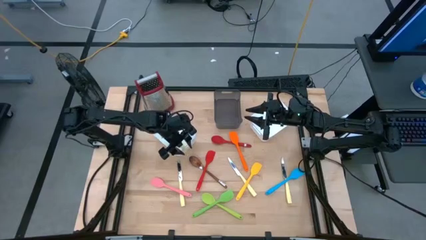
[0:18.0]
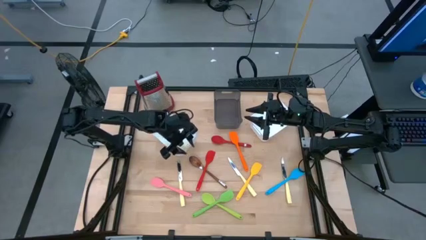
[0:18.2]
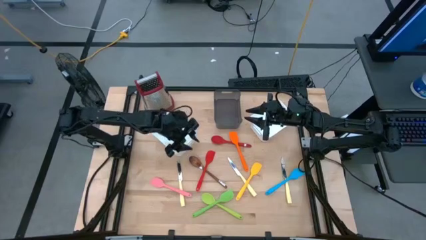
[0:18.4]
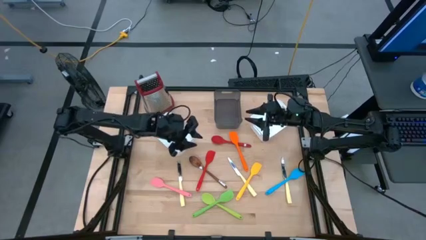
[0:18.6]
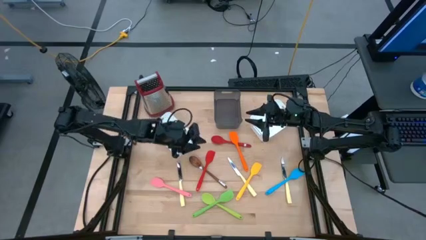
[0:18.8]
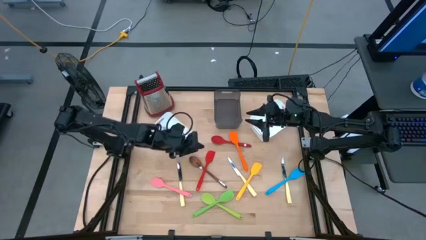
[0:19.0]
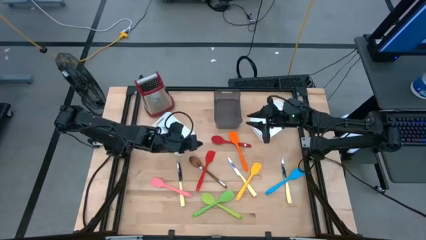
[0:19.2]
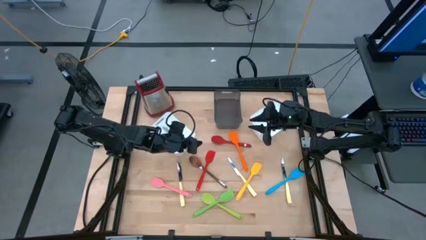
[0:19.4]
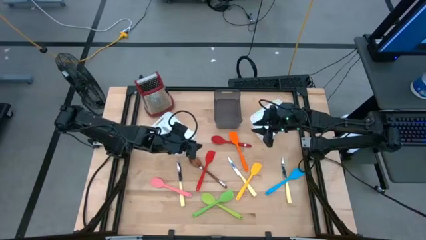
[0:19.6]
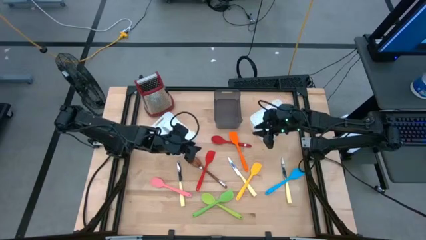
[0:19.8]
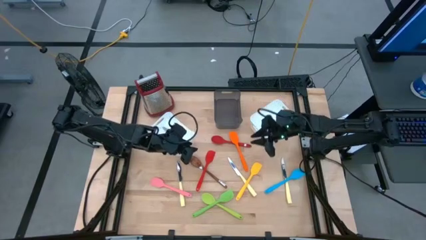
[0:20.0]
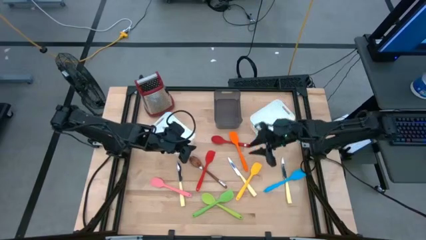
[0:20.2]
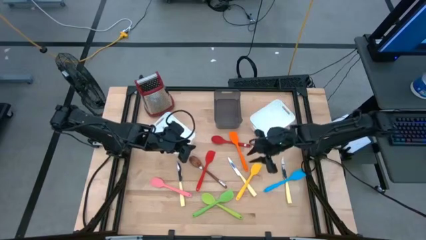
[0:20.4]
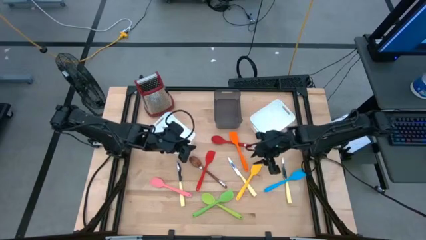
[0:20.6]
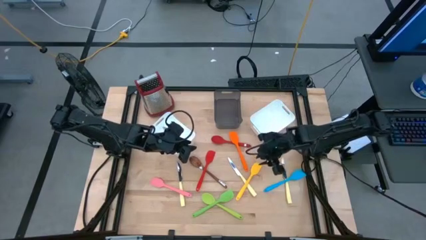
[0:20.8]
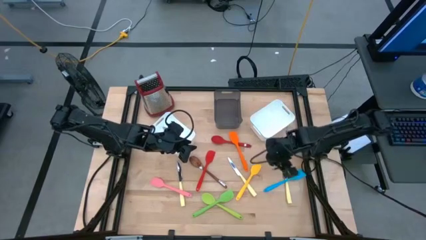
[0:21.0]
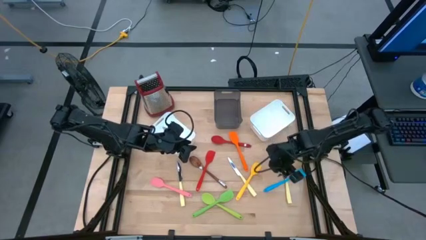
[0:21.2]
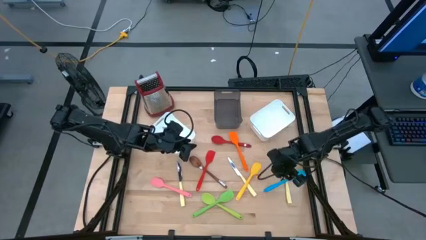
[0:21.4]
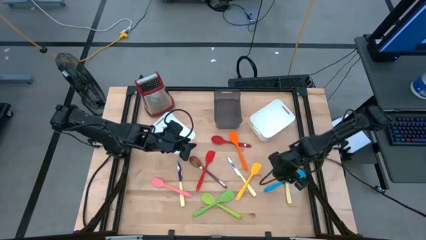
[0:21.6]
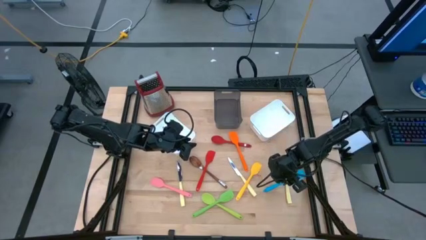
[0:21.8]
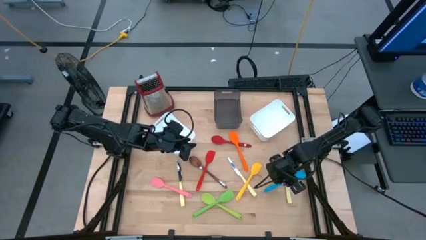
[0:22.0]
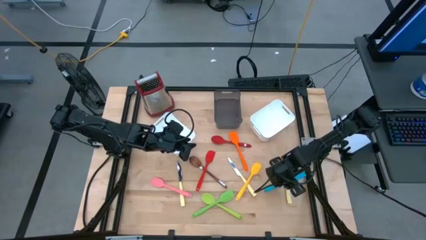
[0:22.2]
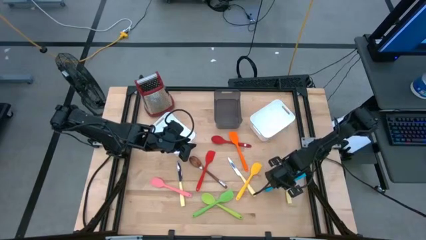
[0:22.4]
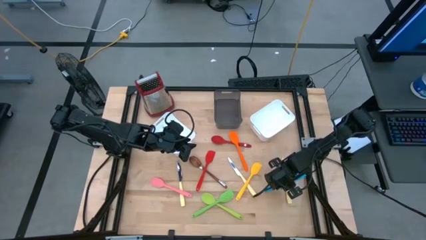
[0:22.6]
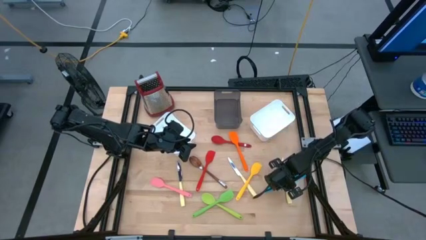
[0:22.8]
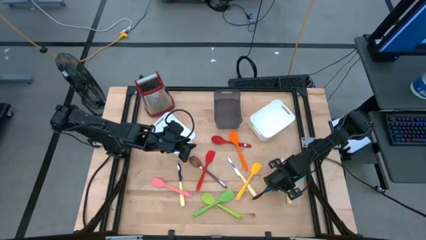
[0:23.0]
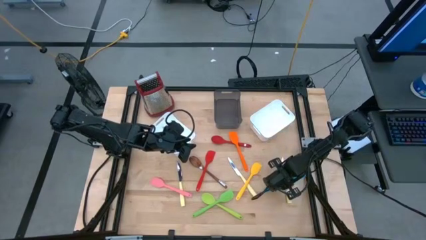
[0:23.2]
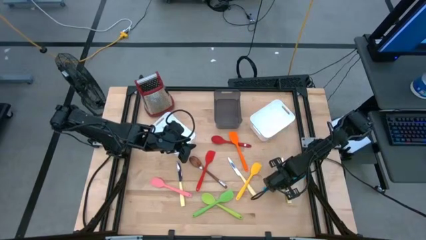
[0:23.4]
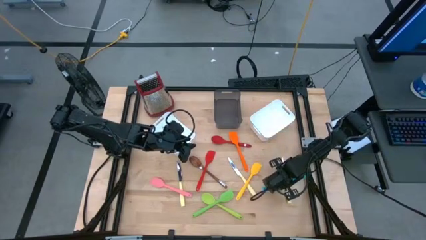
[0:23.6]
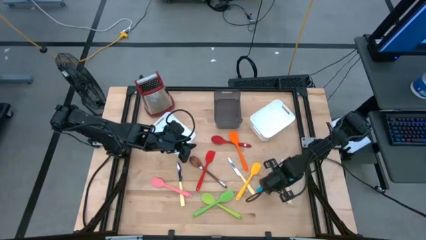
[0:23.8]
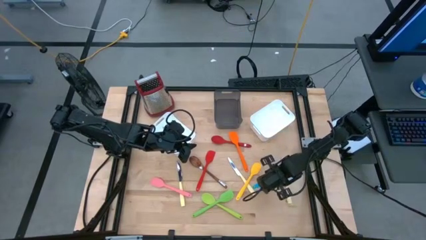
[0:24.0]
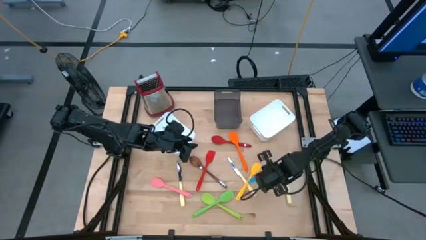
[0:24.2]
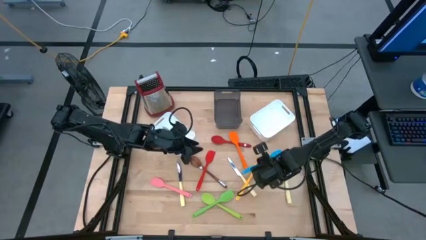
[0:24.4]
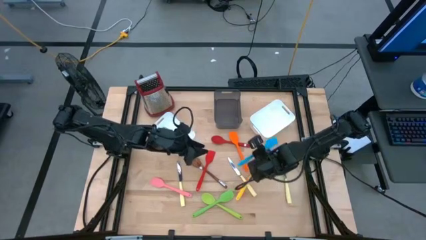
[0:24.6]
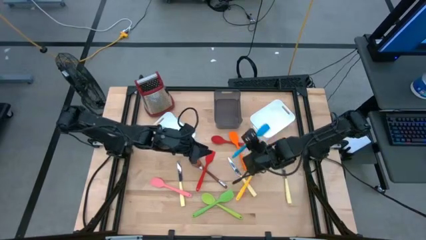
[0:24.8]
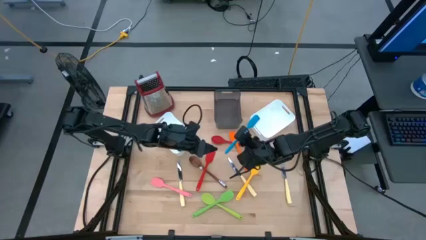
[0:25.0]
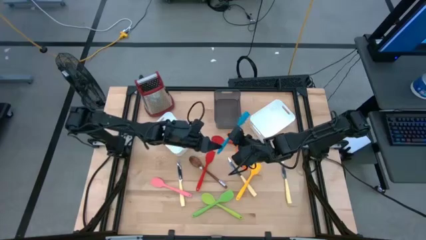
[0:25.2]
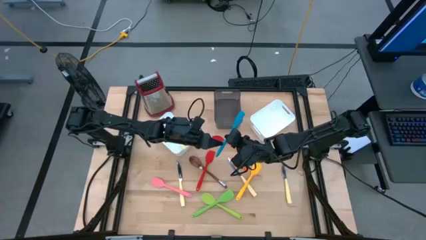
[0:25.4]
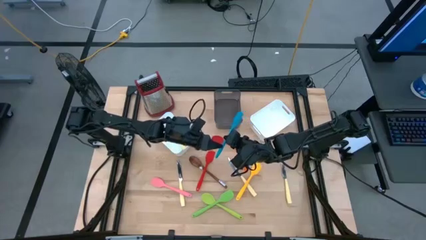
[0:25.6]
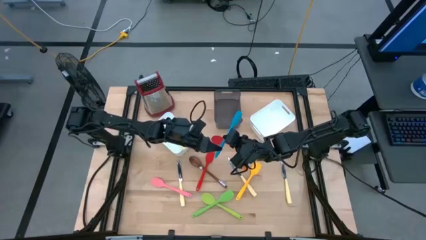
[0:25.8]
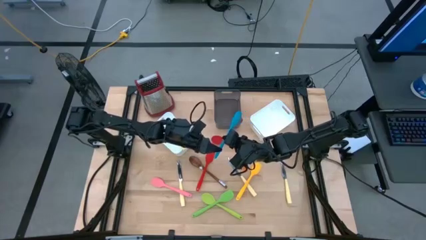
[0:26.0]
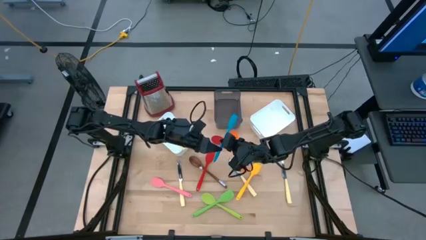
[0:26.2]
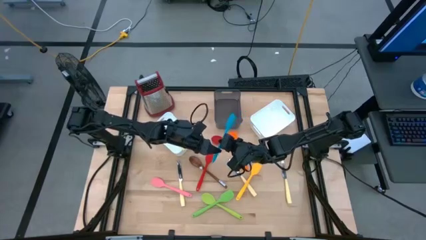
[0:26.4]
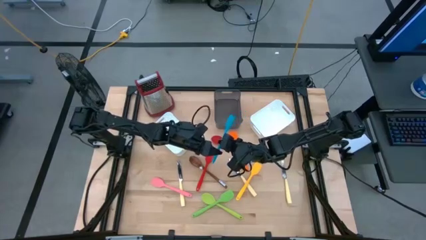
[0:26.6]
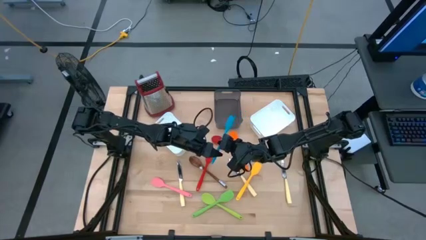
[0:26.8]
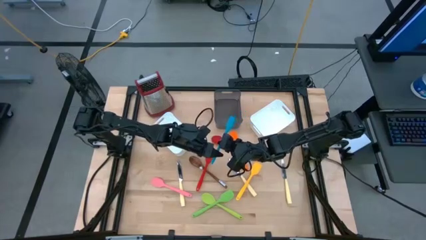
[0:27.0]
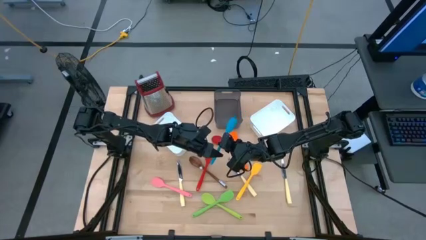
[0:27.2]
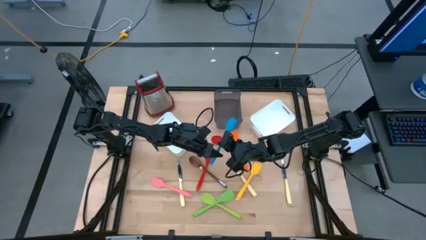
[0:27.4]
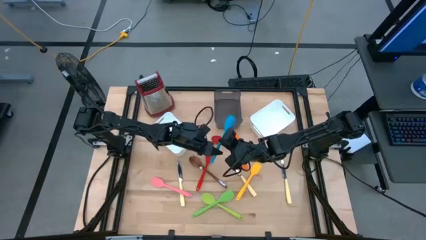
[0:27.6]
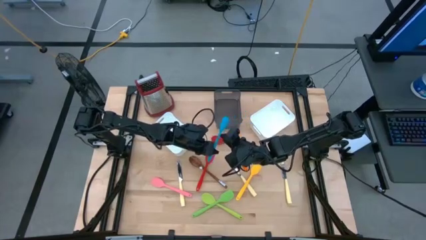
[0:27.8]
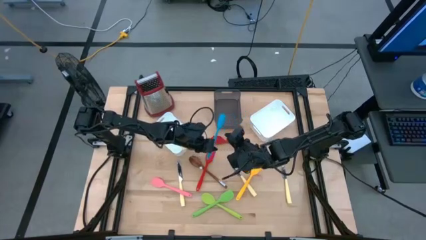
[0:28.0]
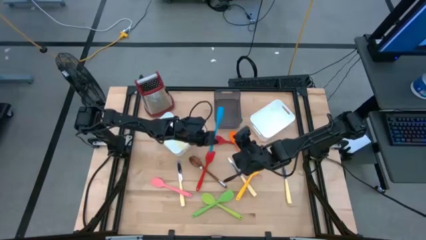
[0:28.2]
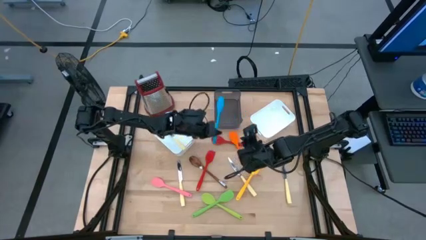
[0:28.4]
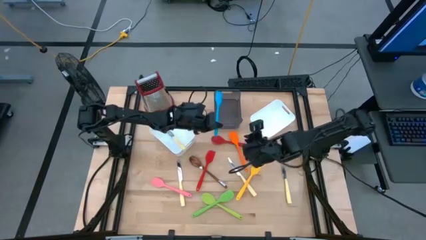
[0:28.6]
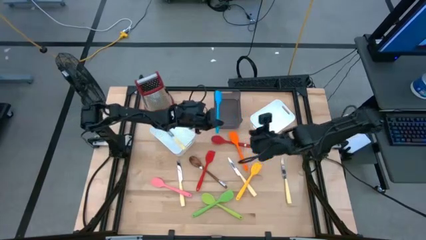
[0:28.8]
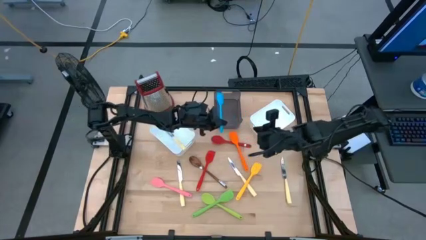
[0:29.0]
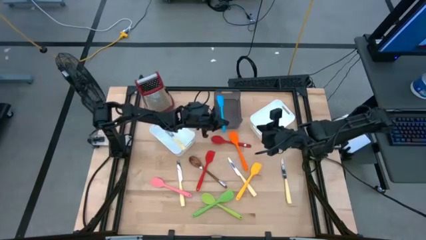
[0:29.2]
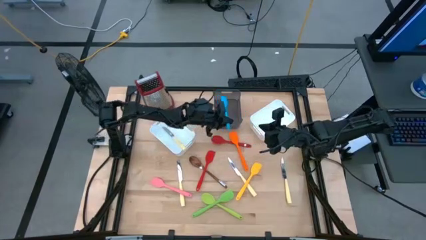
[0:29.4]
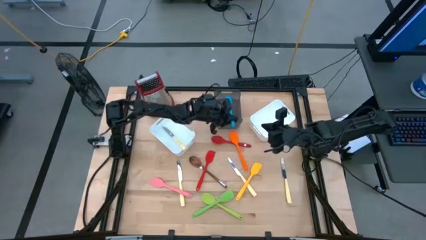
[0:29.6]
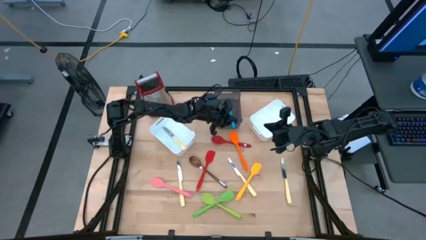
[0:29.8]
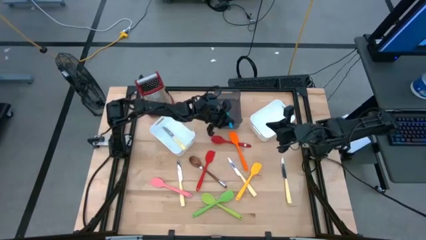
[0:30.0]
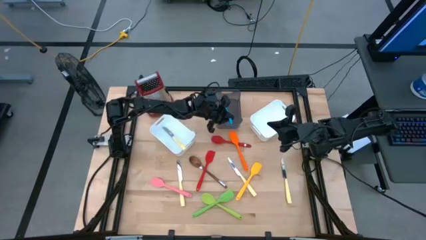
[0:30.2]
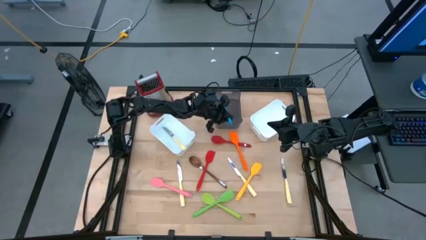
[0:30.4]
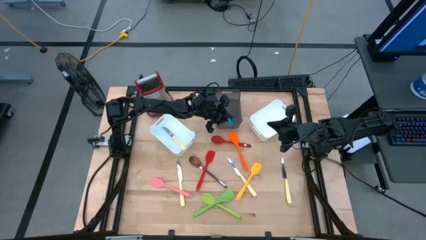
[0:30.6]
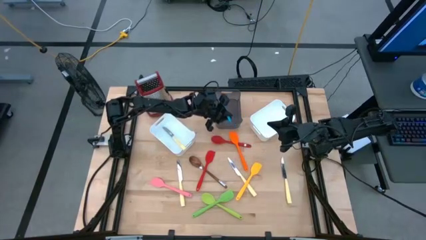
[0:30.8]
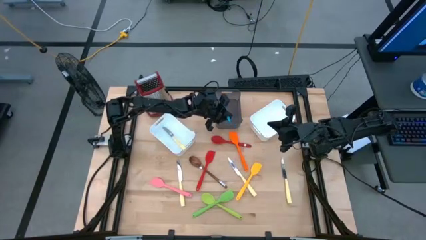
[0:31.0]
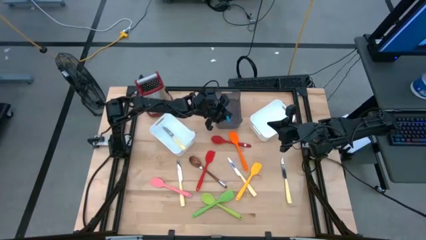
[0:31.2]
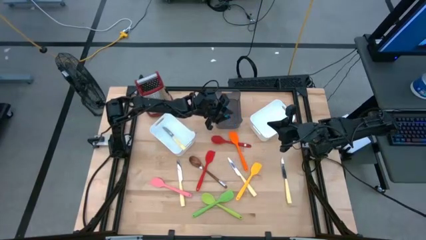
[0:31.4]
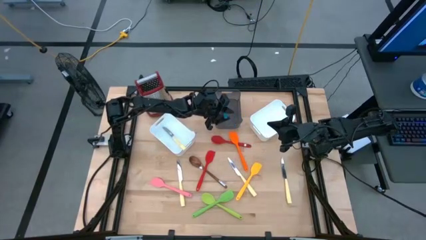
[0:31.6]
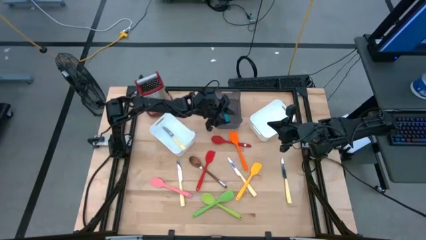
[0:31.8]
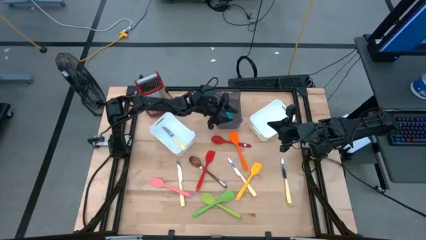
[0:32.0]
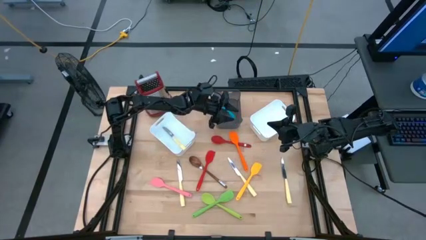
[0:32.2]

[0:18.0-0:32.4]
Task: Pick & Place Kitchen Items
Put the blue spatula into the black bin
